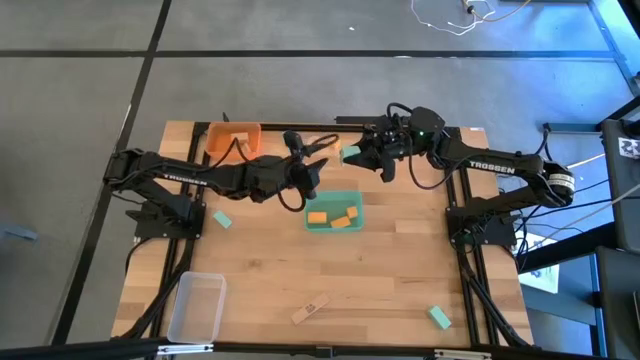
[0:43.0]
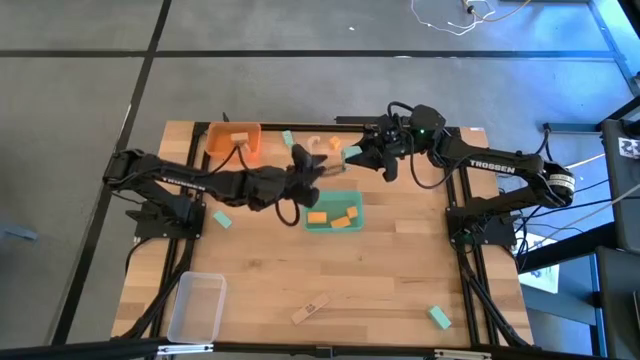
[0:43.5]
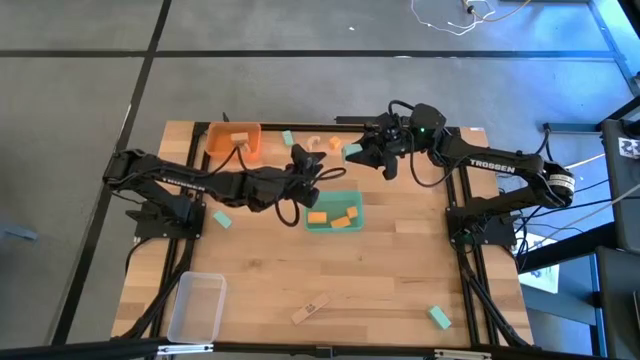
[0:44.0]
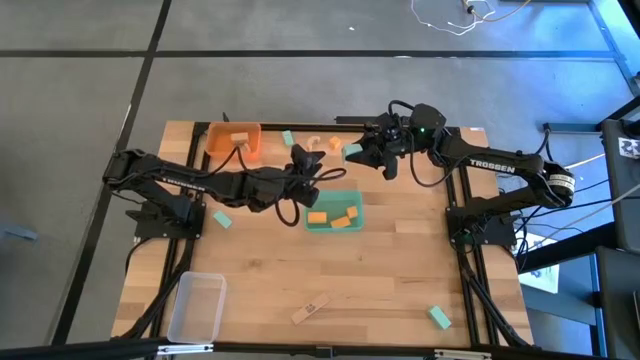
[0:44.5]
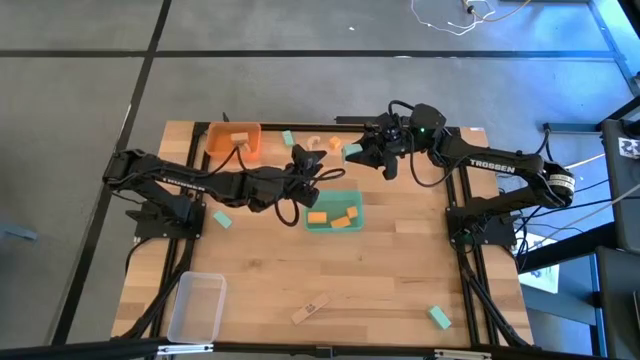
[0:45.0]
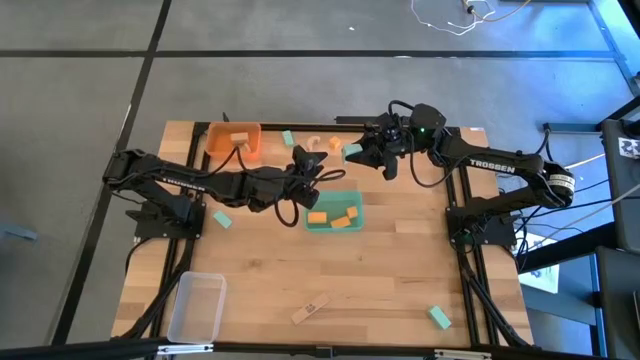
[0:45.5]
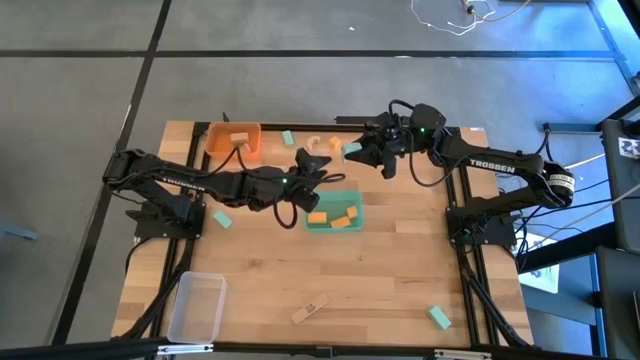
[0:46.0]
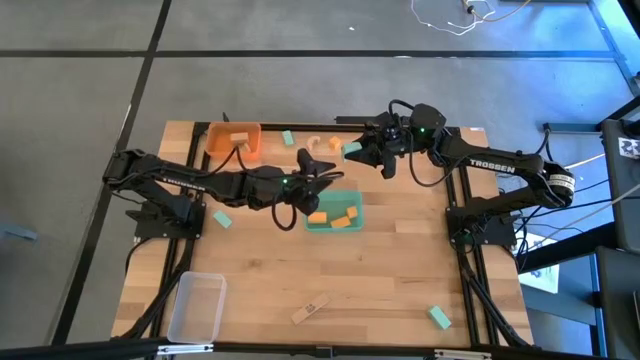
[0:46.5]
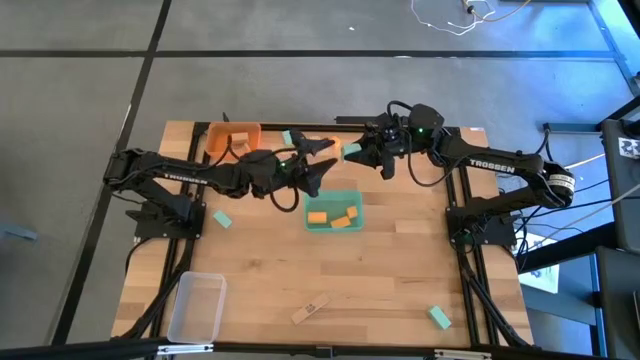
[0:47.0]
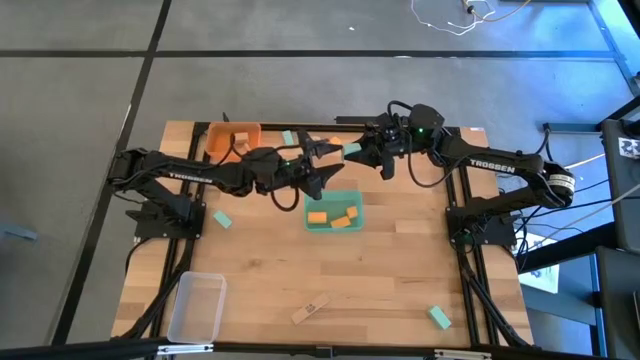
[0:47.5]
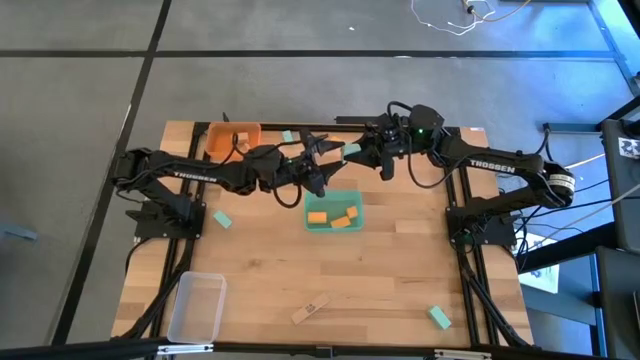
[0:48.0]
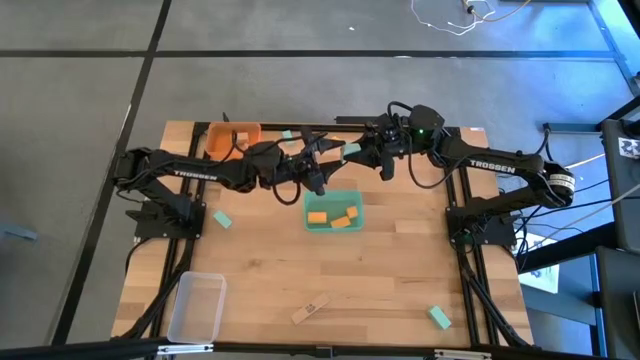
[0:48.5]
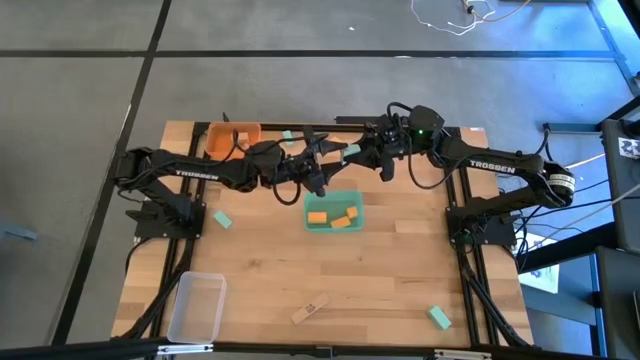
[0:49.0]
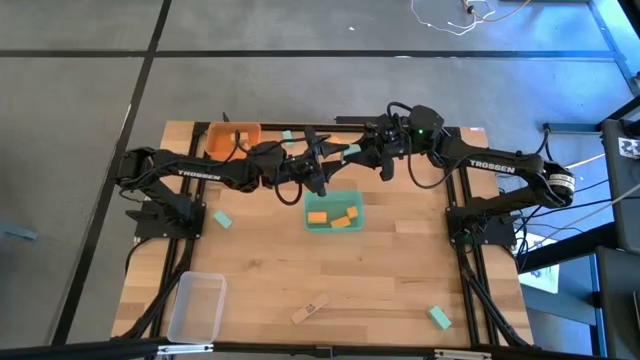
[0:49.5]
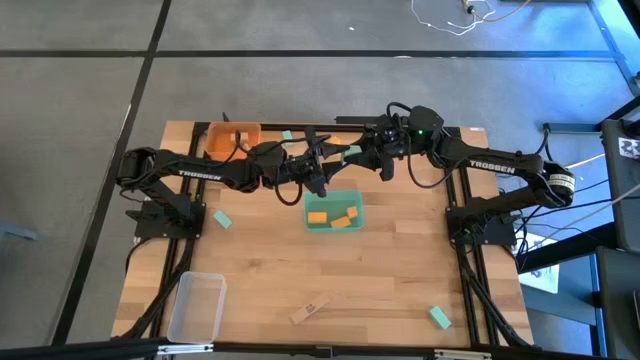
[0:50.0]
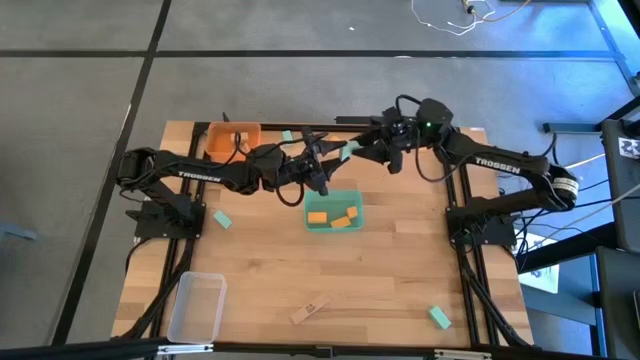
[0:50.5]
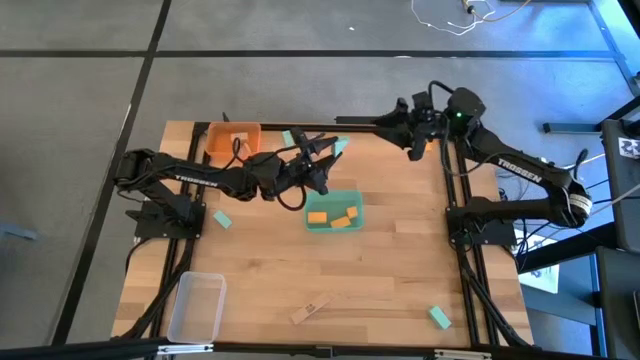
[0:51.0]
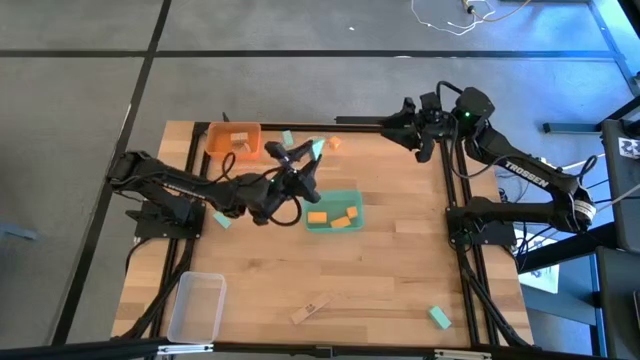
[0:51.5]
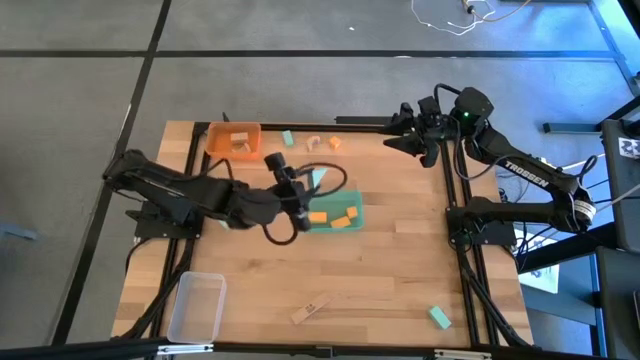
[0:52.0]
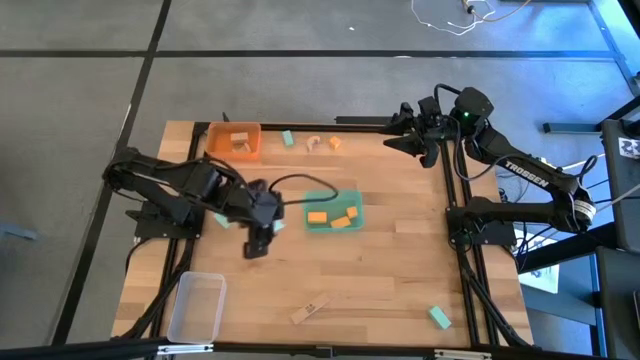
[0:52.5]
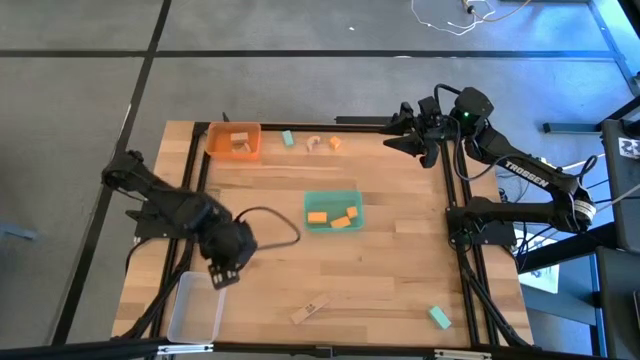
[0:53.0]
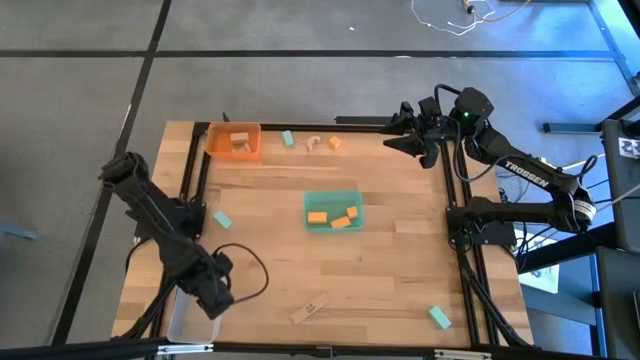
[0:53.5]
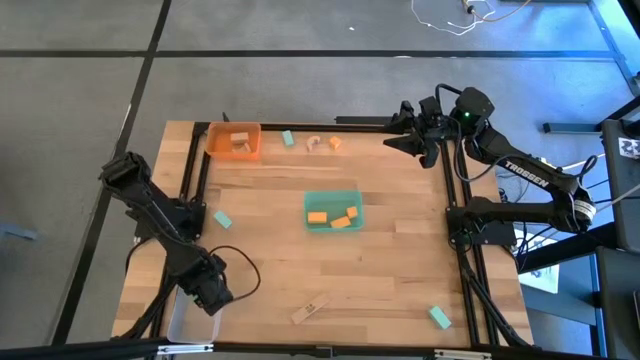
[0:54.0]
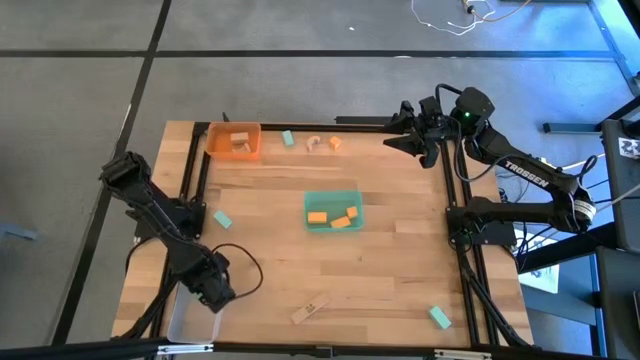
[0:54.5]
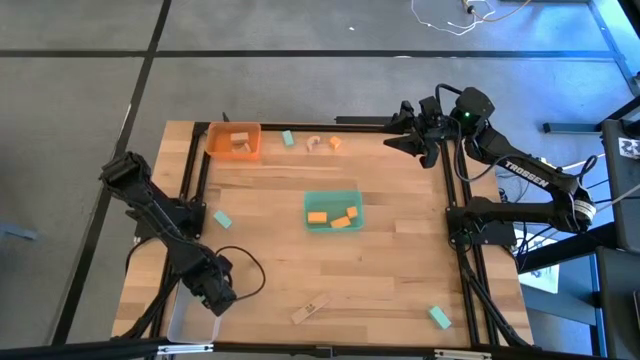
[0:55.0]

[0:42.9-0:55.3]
Task: Sort & place blocks by color
Put the blue block into the transparent bin

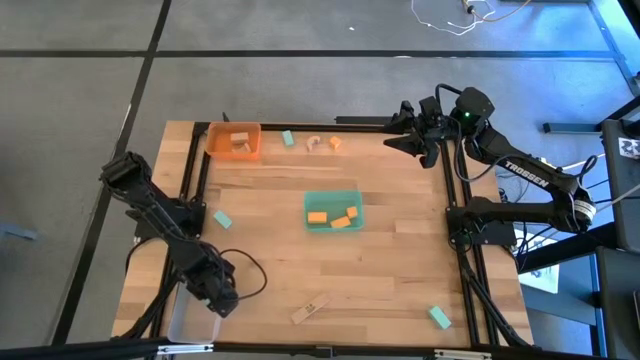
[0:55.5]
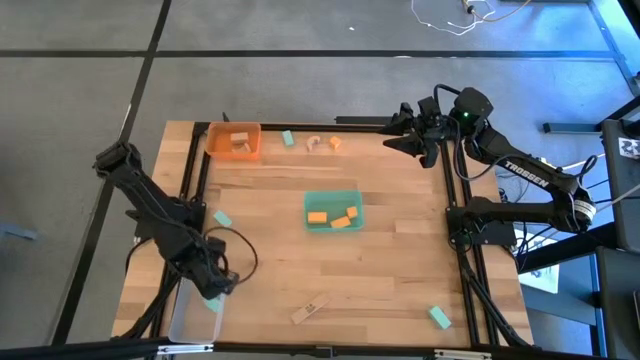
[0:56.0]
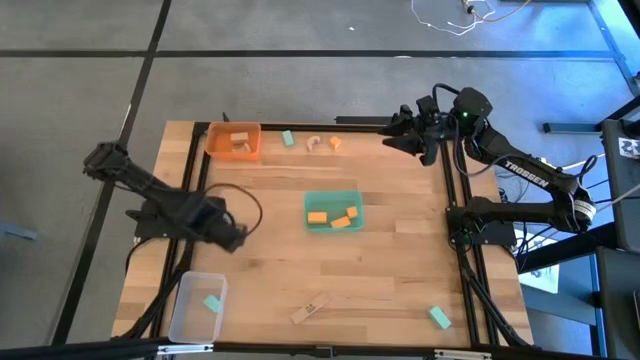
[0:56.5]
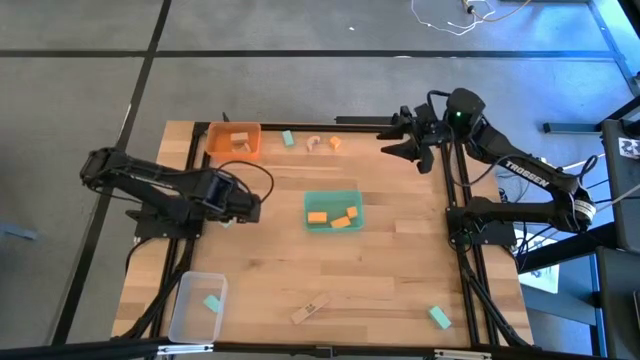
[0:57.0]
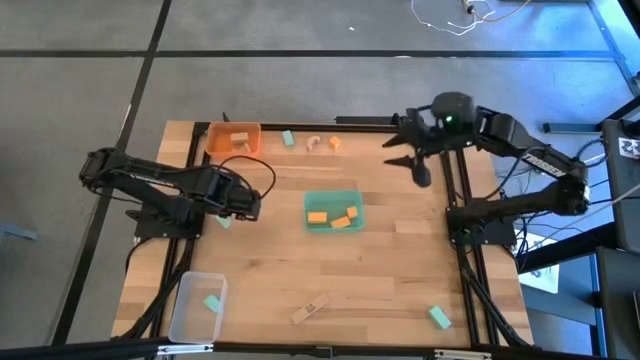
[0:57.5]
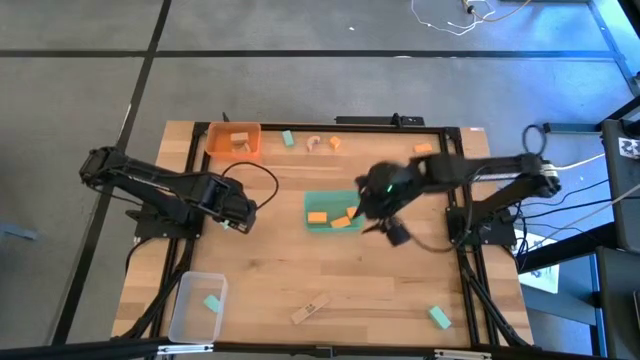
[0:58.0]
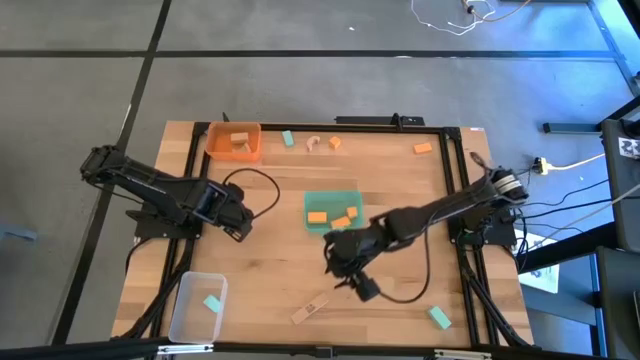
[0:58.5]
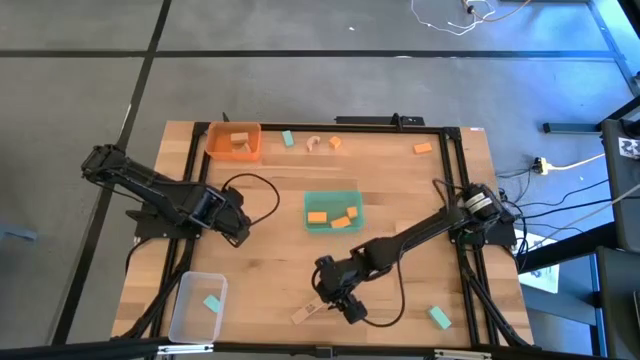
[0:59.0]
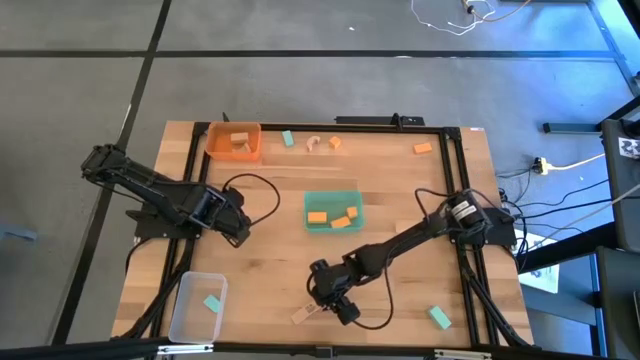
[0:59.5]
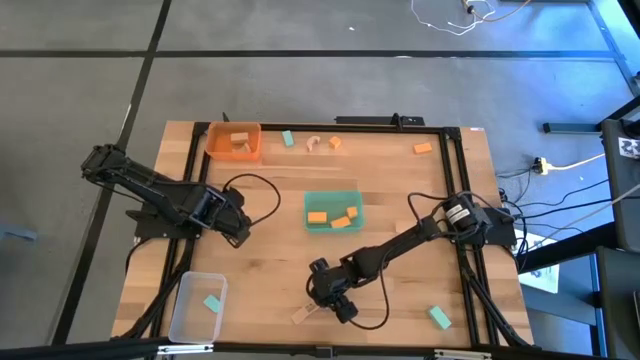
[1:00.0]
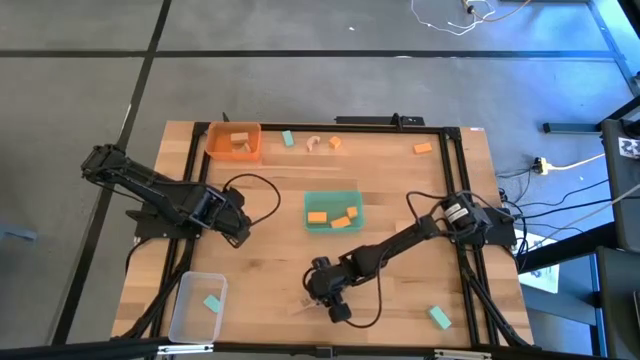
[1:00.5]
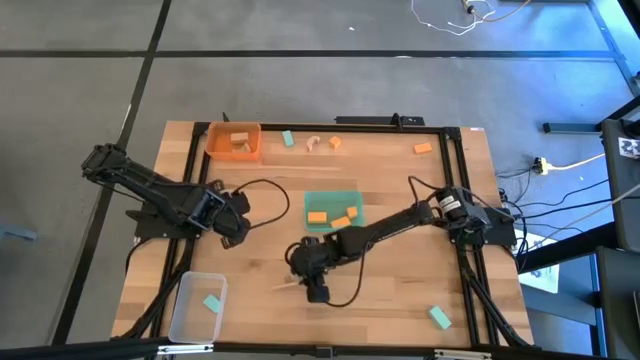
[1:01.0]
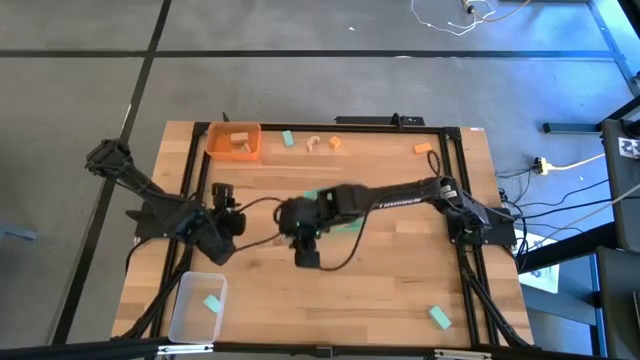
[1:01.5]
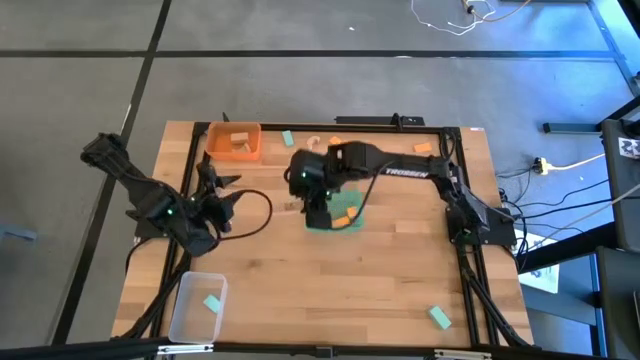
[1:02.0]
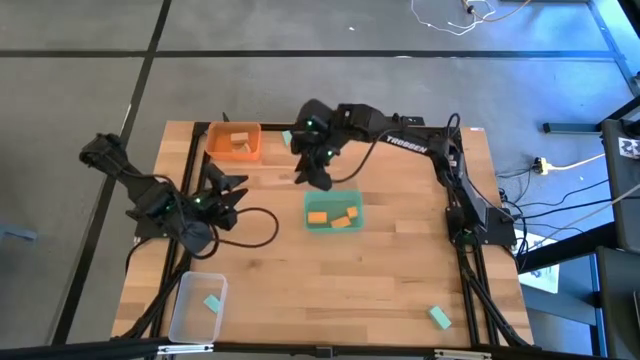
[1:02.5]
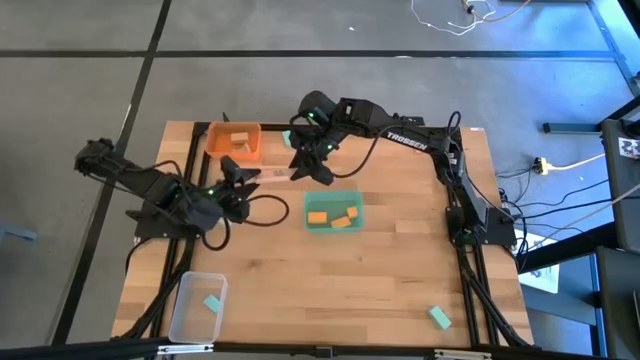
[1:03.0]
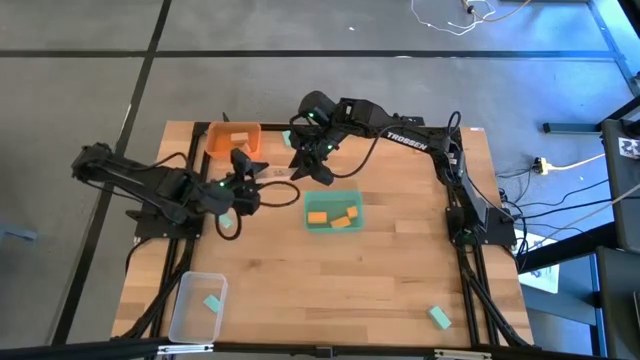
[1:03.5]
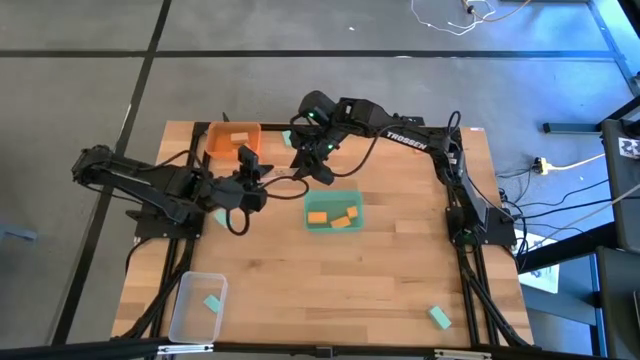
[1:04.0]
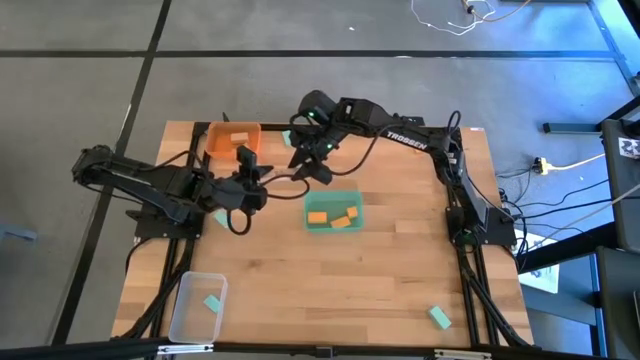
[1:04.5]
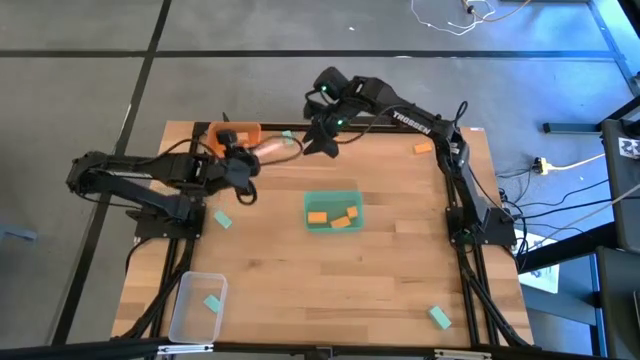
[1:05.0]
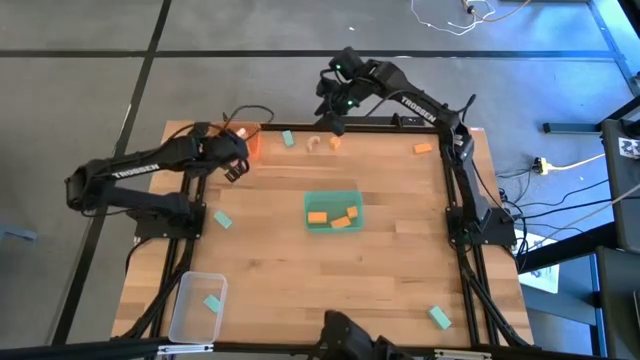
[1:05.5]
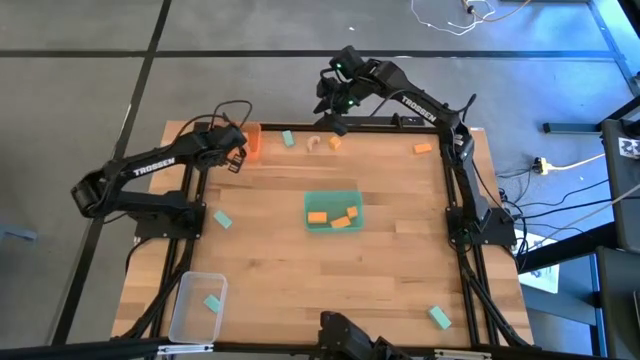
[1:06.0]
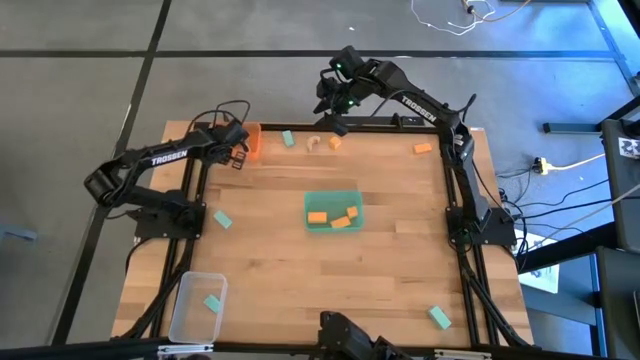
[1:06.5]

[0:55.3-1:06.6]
Put the brown block into the light orange bin
